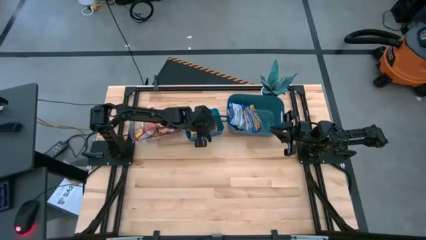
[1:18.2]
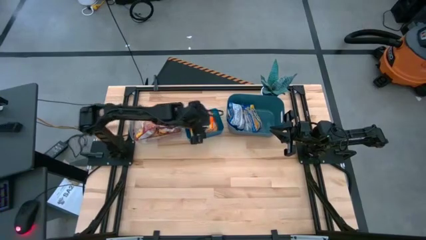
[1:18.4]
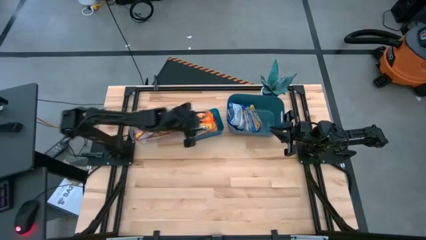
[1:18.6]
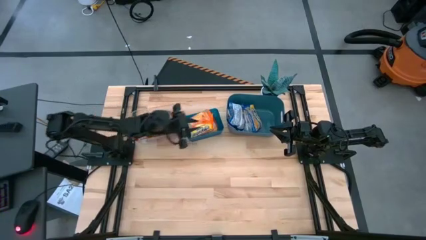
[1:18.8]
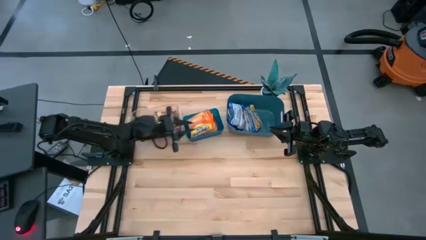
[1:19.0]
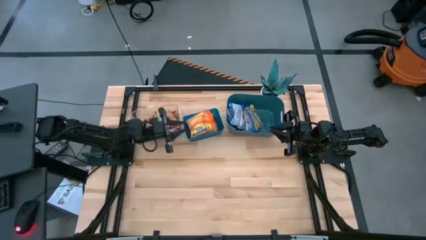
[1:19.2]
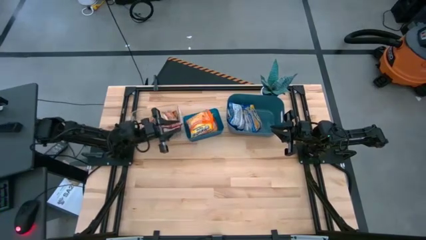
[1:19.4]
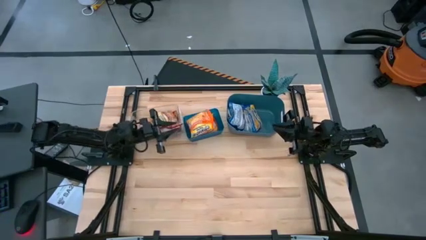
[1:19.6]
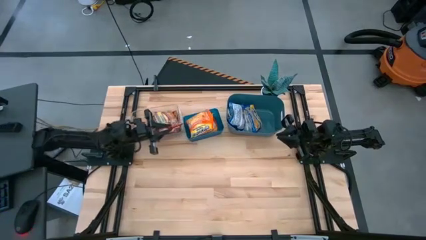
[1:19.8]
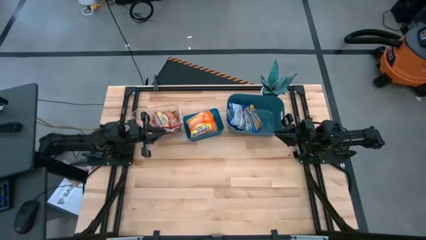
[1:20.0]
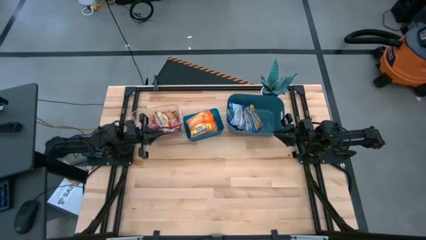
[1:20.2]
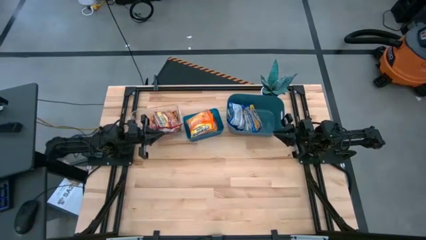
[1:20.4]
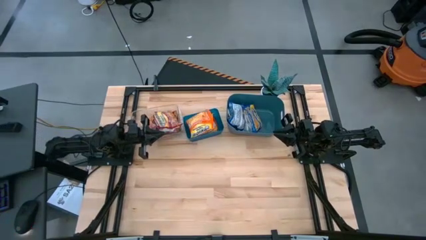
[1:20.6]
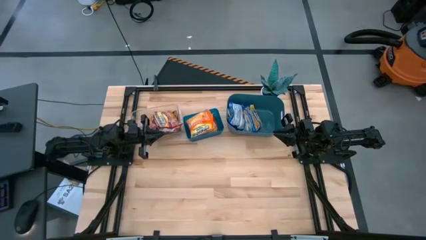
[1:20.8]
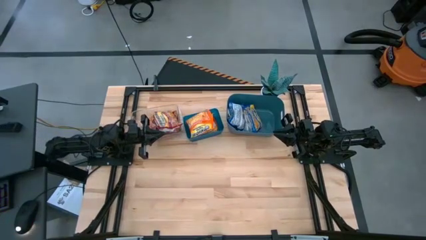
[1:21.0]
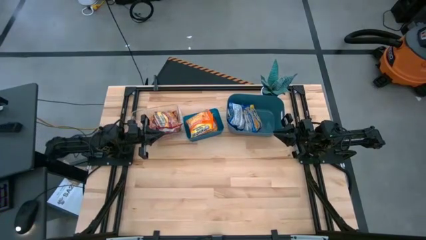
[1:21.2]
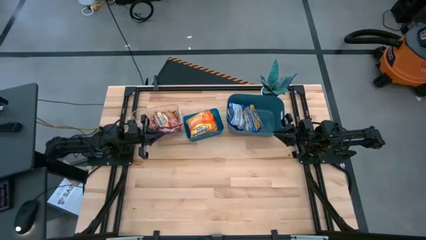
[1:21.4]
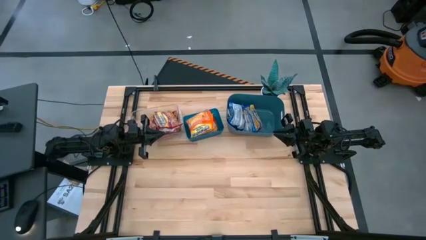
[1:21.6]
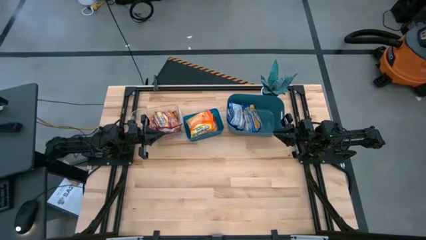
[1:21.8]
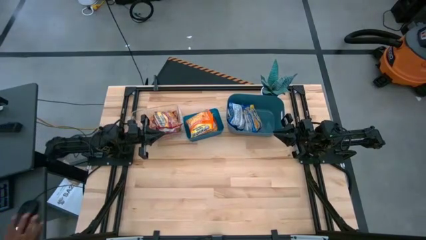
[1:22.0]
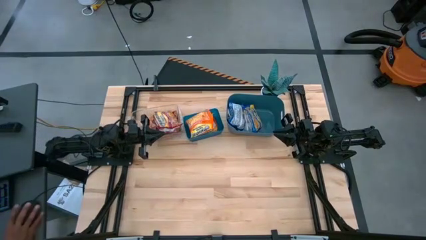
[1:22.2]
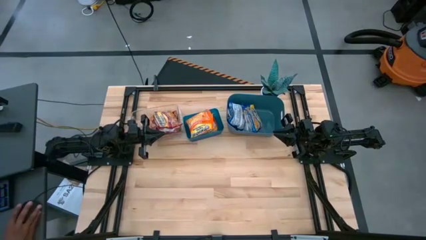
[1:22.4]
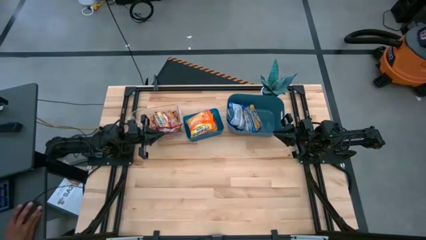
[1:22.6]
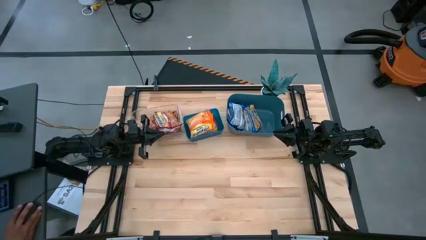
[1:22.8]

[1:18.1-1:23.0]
Task: Sort Maruchan noodles
Return to Home Position

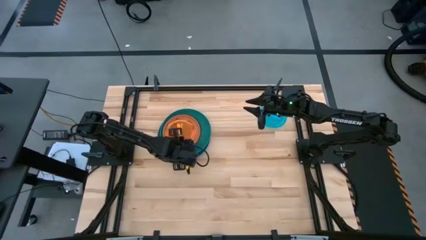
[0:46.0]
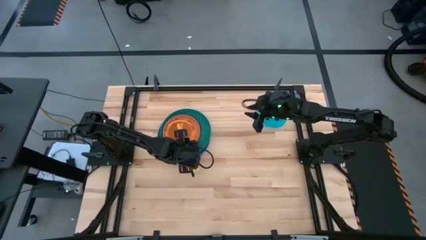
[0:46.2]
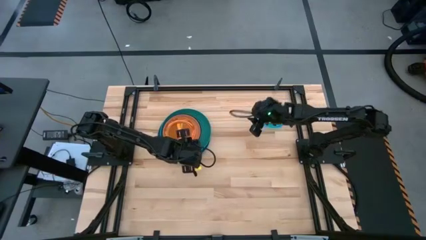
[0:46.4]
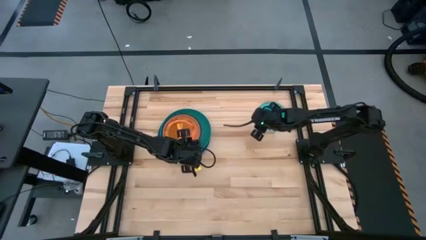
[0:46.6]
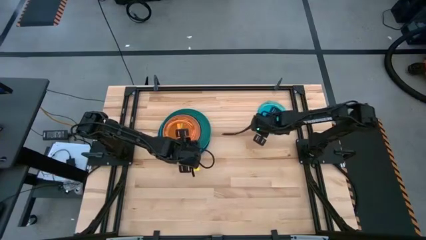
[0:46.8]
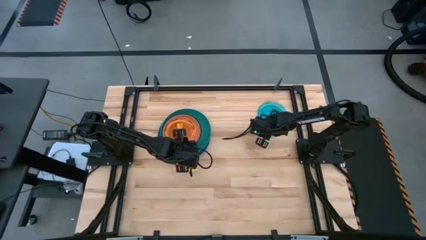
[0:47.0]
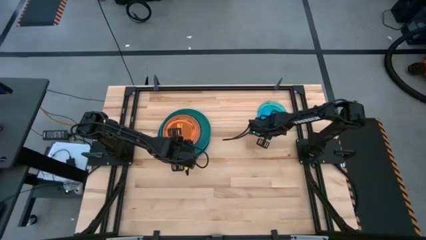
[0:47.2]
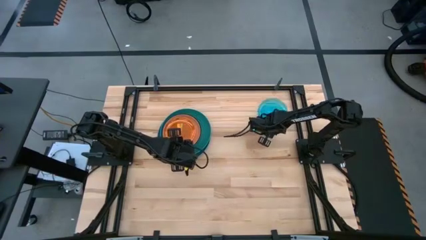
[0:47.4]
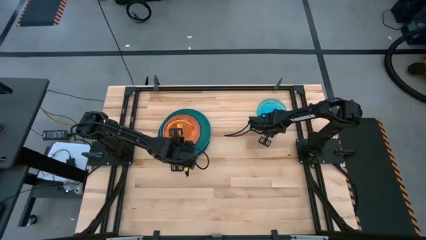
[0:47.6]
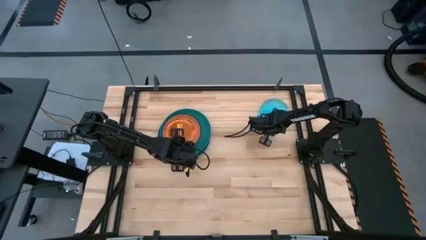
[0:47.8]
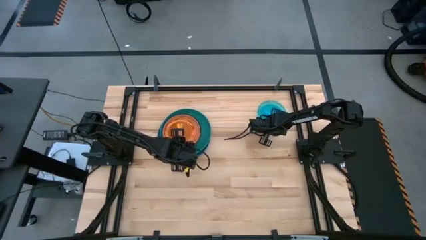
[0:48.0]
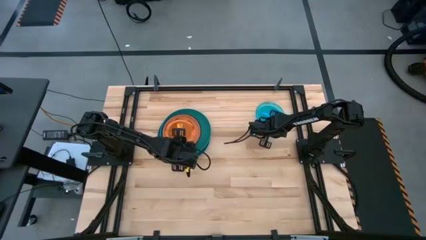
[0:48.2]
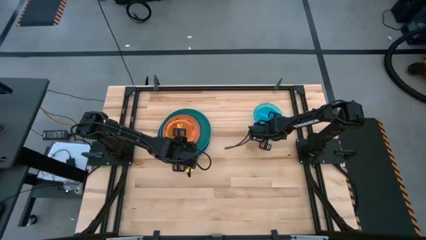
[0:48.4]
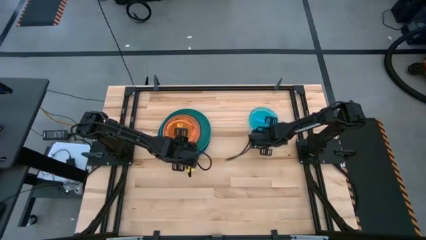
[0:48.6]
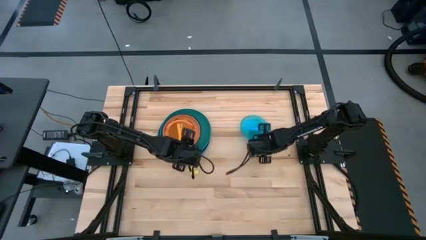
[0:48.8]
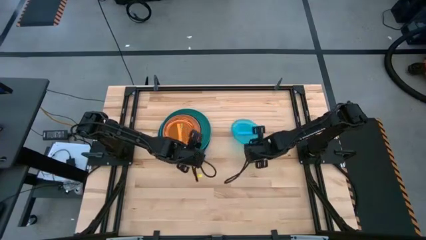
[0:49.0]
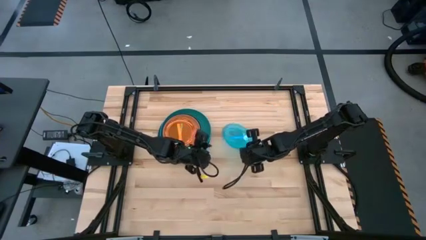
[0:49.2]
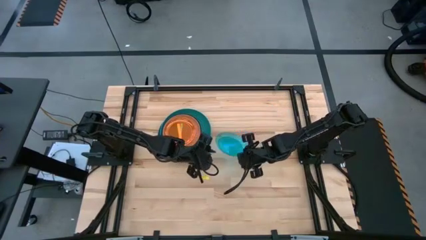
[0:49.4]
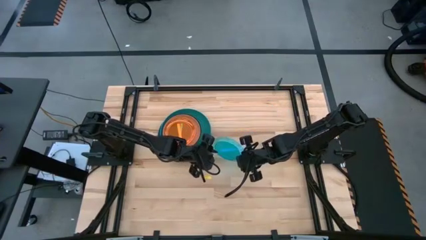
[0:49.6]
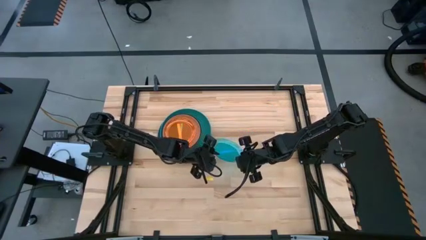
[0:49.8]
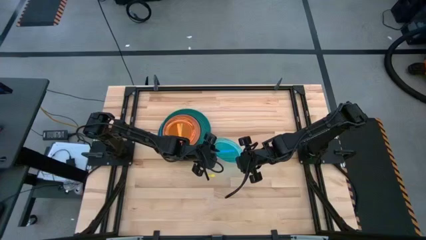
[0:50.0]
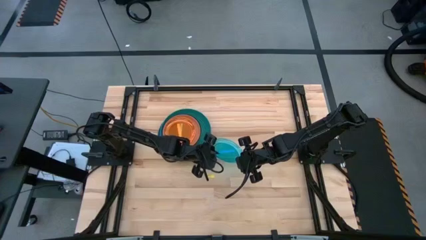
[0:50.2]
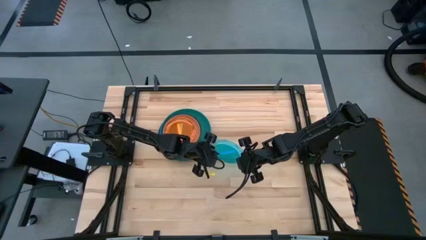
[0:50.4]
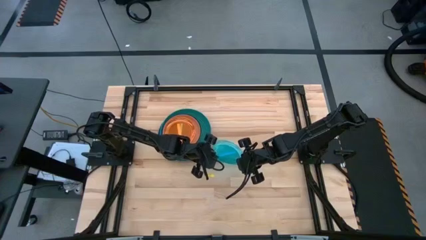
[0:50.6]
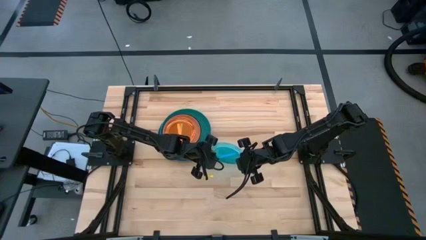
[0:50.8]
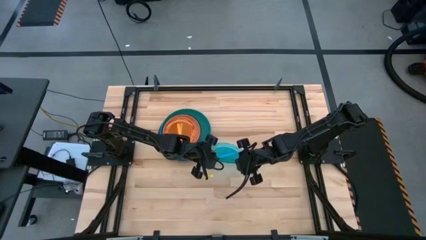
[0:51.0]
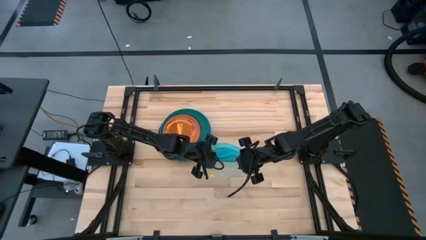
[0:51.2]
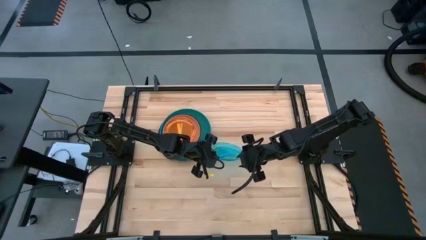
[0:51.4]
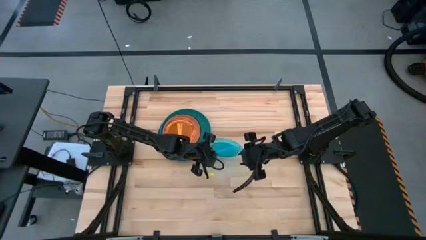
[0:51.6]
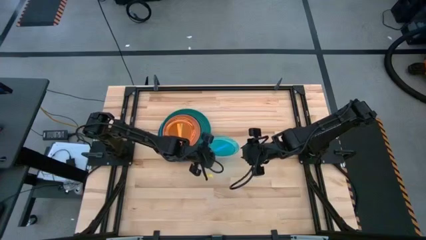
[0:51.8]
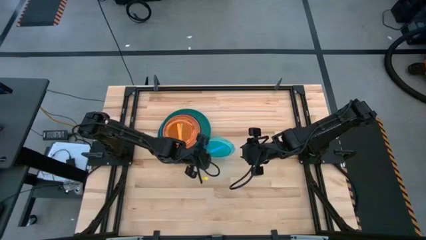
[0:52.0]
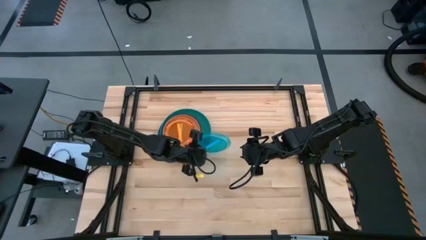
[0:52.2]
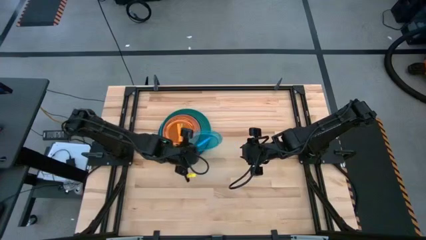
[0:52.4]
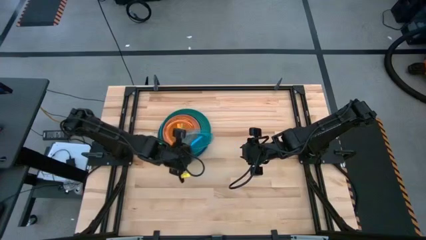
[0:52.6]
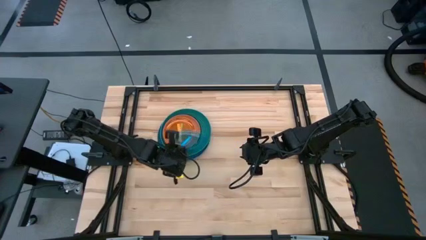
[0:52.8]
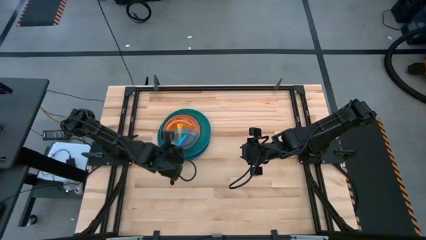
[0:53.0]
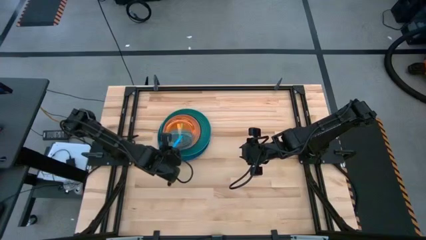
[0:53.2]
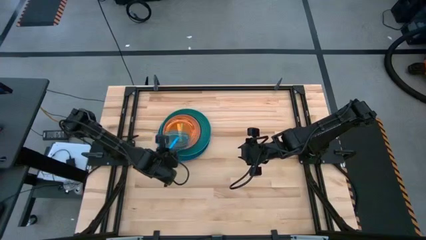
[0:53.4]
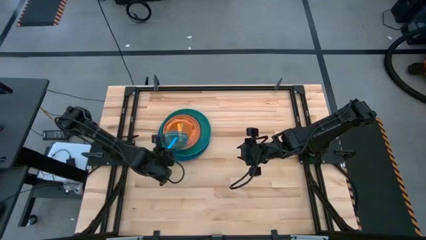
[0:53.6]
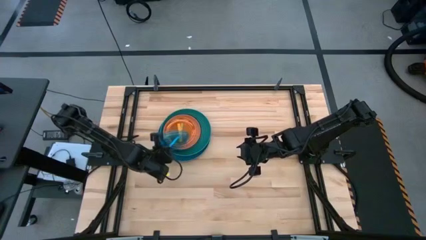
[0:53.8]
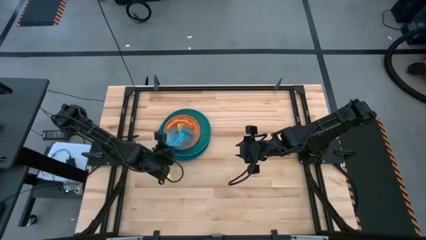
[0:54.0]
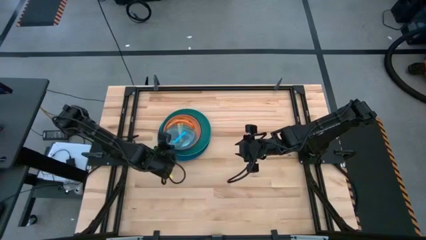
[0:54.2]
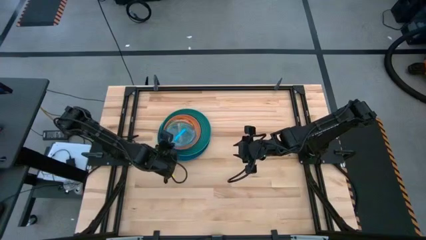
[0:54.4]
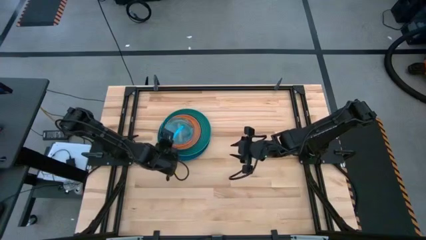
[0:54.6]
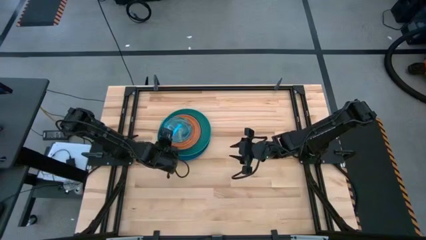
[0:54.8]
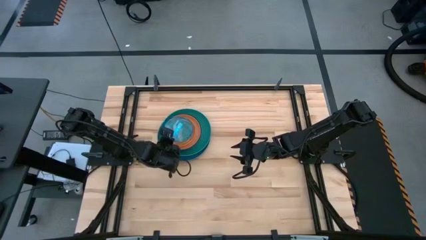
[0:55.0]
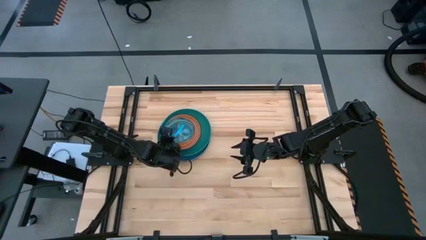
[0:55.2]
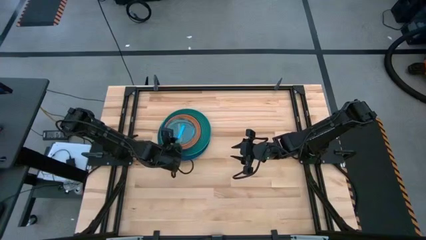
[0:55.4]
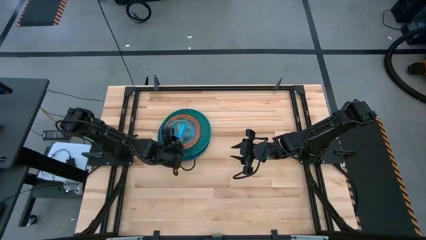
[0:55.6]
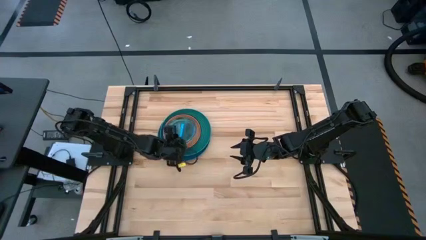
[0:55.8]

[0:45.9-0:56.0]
Task: Stack plastic plates
Stack the transparent blue plate on the transparent orange plate
